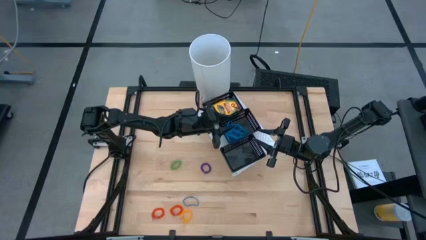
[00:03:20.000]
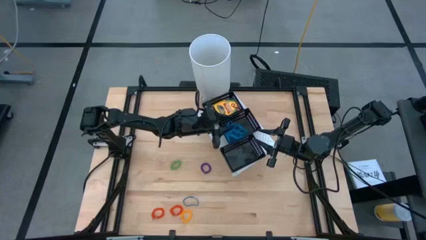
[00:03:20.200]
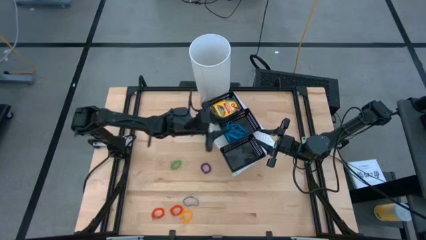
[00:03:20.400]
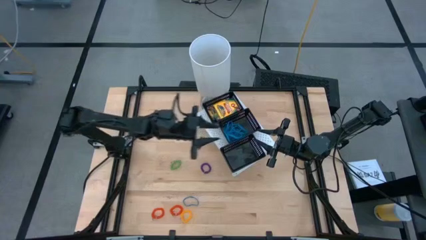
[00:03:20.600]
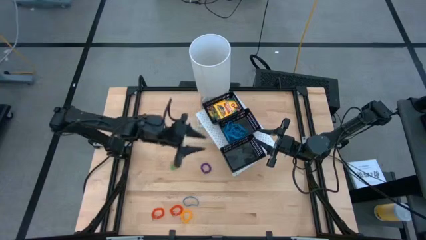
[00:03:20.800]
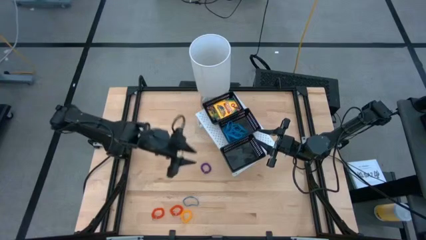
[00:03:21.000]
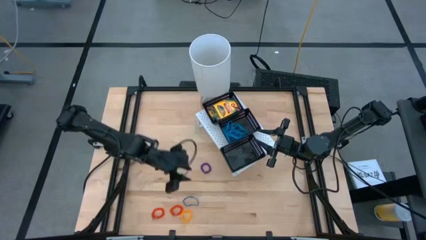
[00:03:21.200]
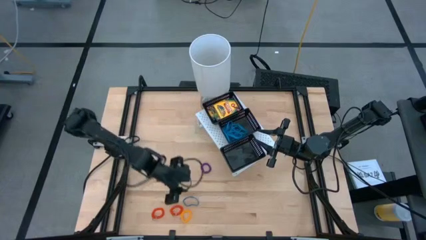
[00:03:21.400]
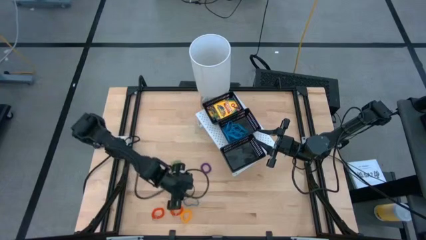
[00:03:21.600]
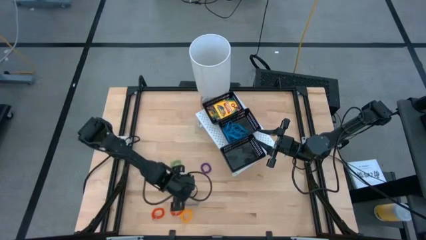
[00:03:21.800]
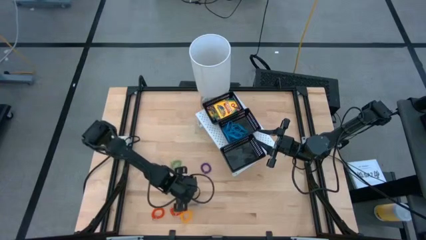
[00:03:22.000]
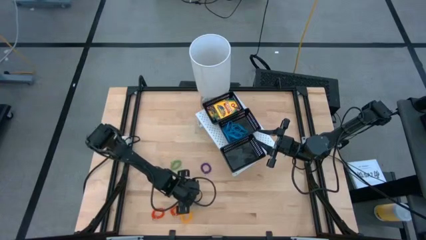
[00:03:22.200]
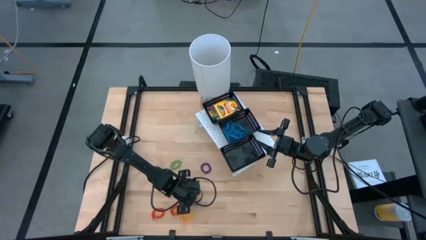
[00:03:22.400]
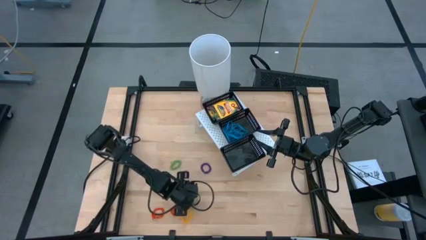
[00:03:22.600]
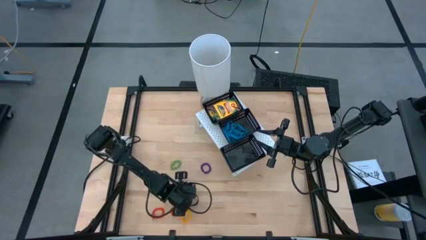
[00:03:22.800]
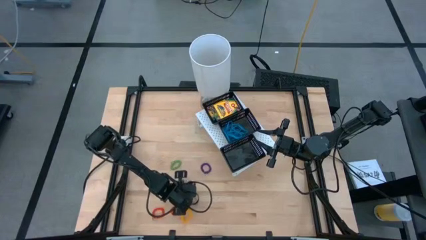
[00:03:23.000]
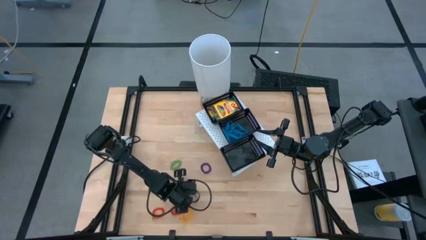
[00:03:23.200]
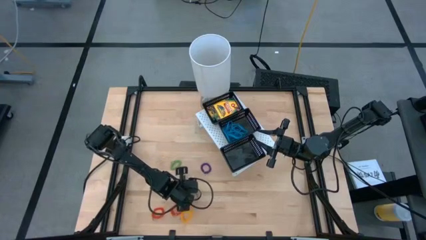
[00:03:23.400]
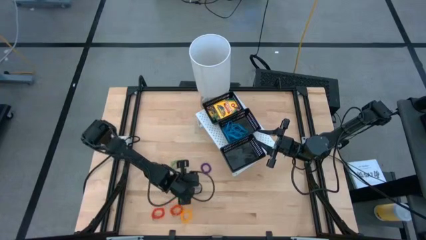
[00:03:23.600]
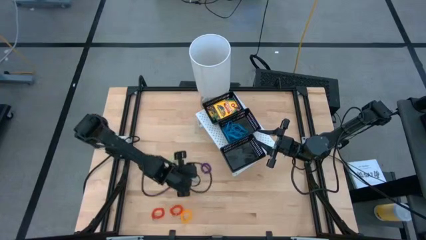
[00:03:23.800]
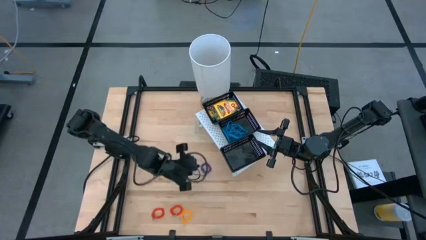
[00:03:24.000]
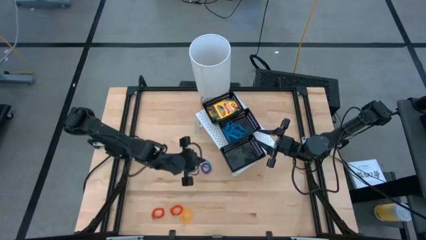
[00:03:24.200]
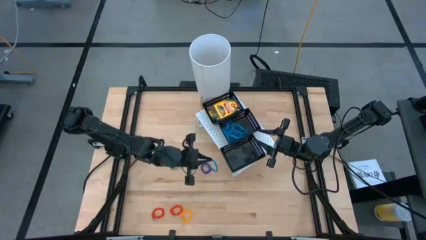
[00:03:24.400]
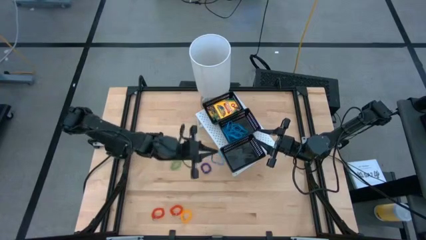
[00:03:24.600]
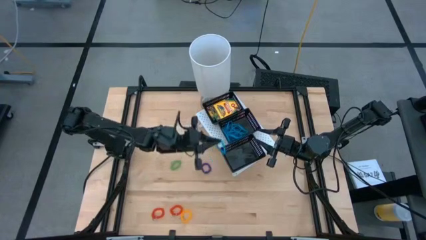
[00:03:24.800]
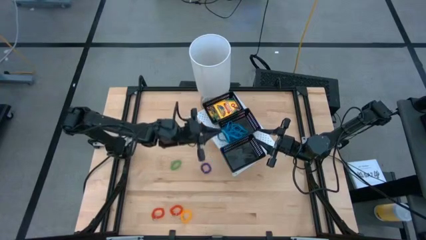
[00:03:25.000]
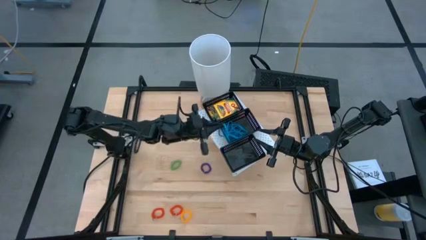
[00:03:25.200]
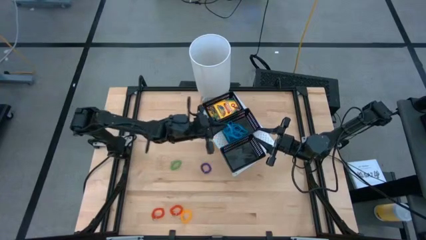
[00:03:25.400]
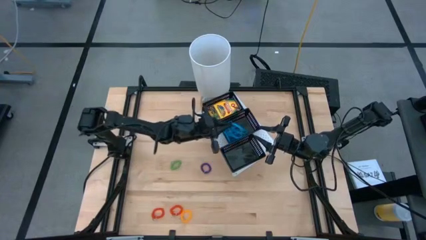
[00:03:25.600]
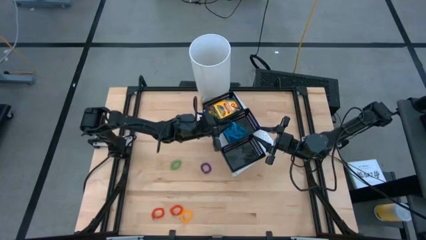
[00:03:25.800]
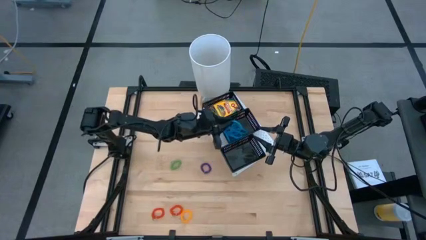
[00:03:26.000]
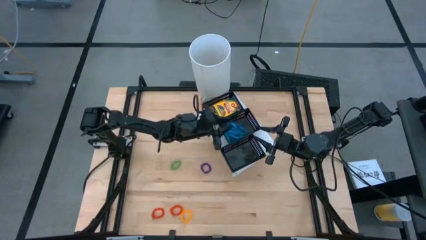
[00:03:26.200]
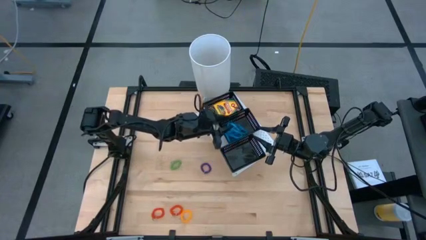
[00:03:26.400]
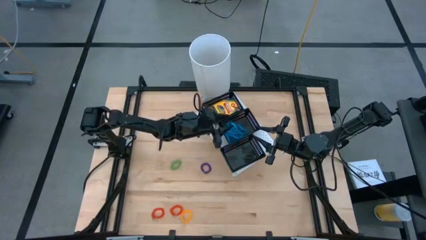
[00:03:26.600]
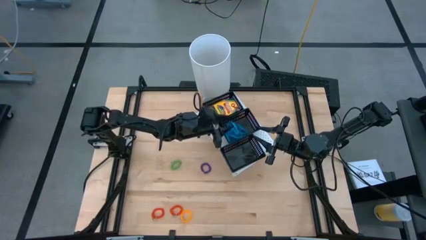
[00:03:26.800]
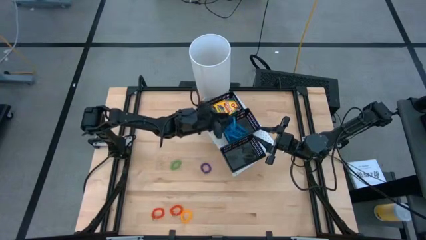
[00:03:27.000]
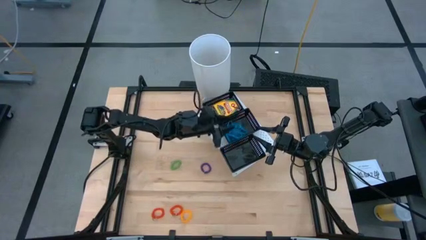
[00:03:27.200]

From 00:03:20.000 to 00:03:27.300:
Task: Pick & Place Office Desk Supplies
Put the blue rubber band into the middle black bin on the shelf

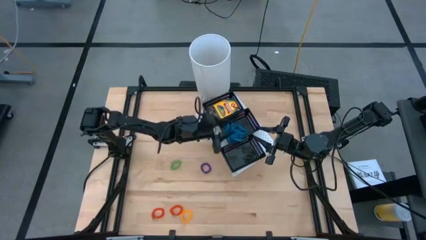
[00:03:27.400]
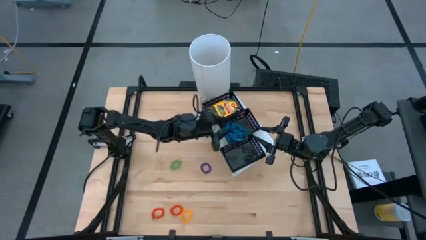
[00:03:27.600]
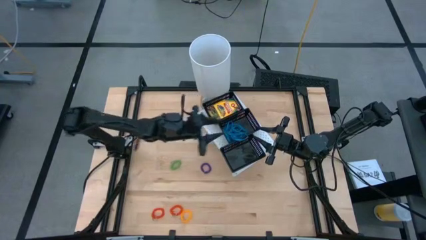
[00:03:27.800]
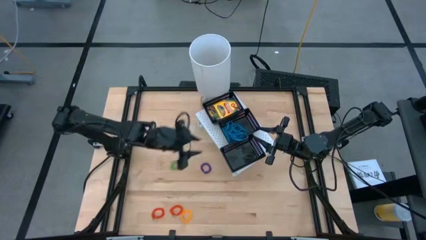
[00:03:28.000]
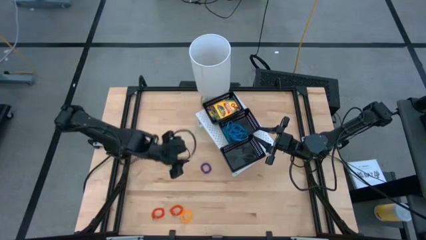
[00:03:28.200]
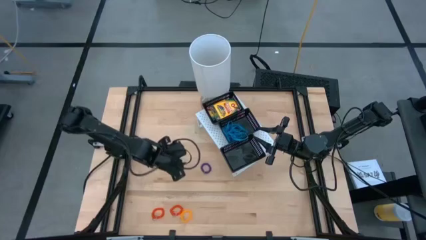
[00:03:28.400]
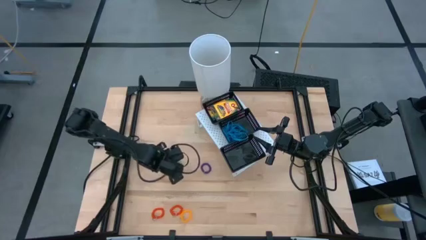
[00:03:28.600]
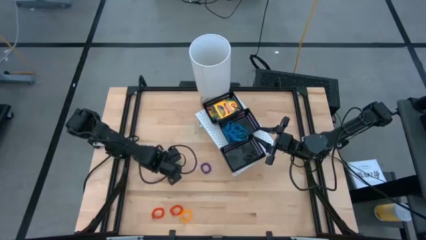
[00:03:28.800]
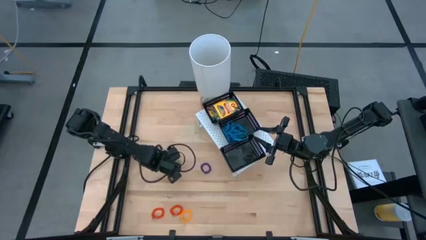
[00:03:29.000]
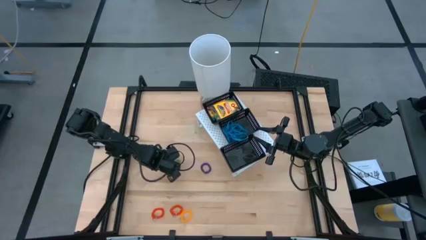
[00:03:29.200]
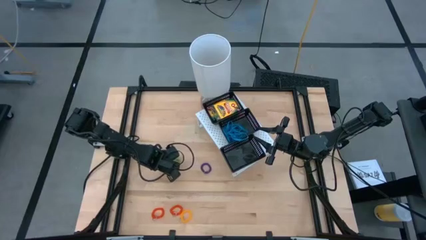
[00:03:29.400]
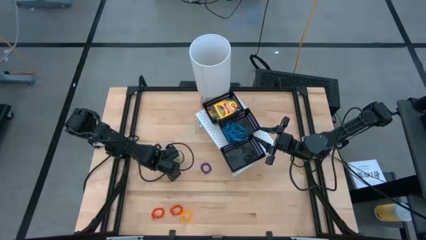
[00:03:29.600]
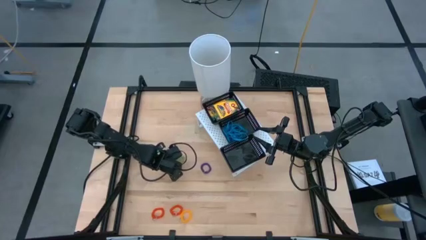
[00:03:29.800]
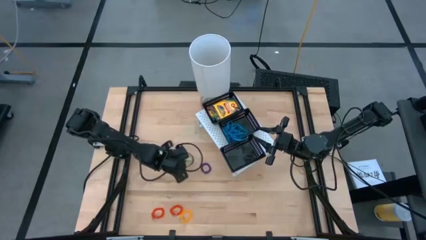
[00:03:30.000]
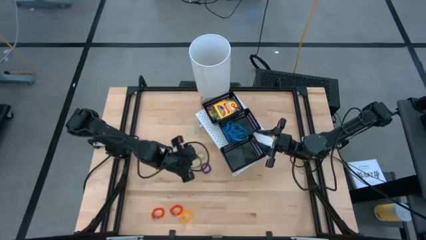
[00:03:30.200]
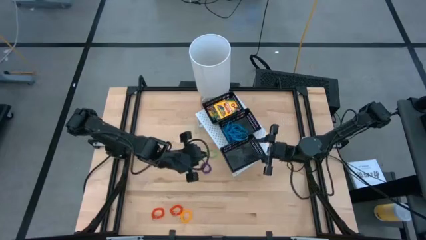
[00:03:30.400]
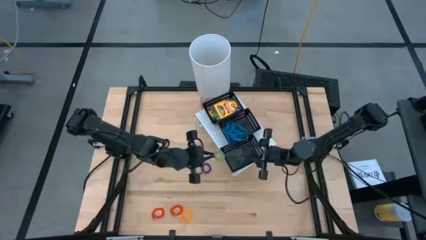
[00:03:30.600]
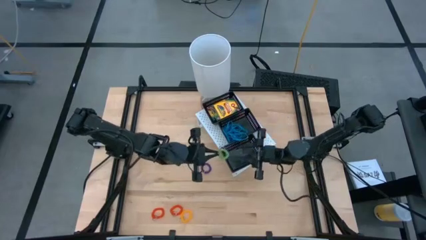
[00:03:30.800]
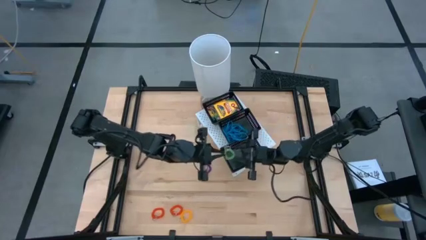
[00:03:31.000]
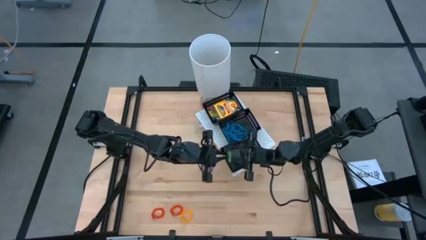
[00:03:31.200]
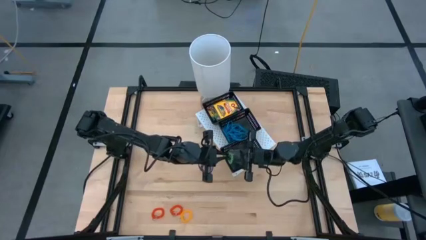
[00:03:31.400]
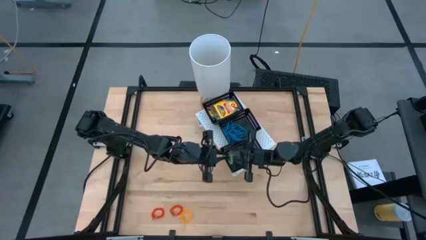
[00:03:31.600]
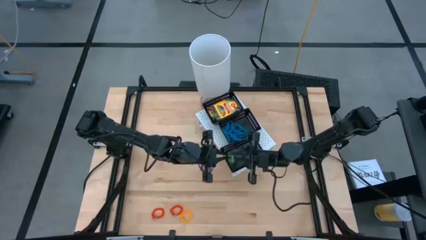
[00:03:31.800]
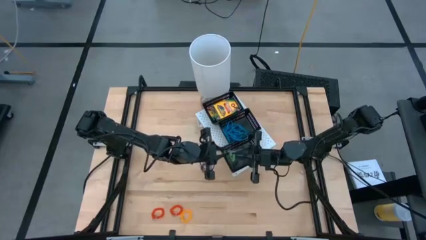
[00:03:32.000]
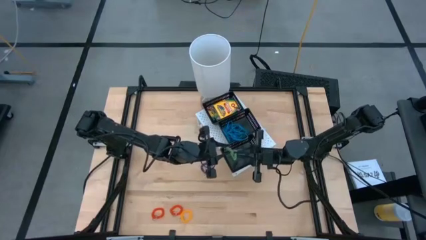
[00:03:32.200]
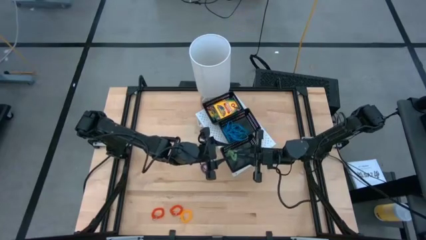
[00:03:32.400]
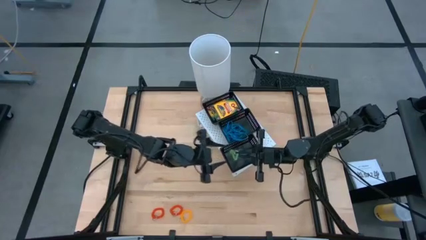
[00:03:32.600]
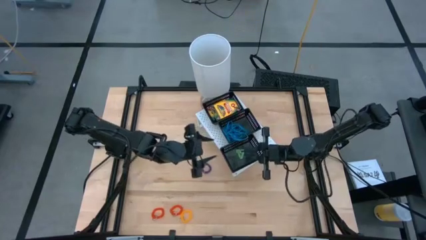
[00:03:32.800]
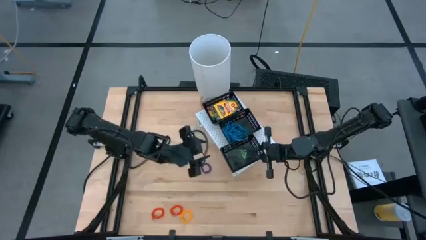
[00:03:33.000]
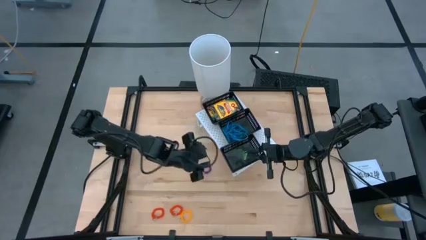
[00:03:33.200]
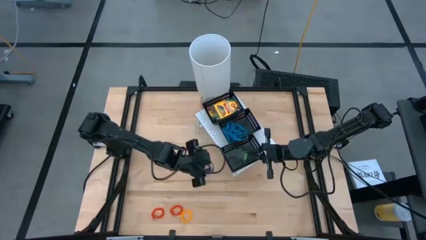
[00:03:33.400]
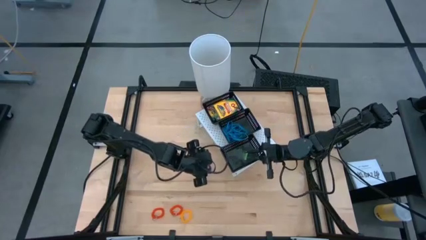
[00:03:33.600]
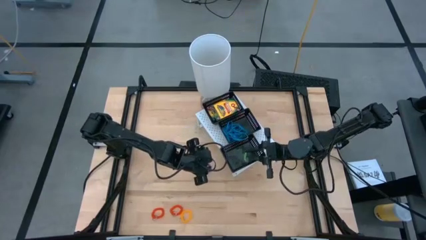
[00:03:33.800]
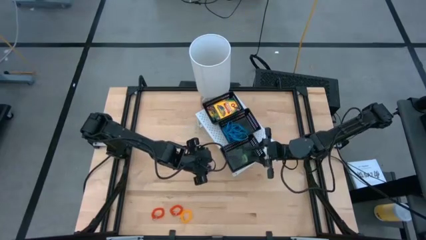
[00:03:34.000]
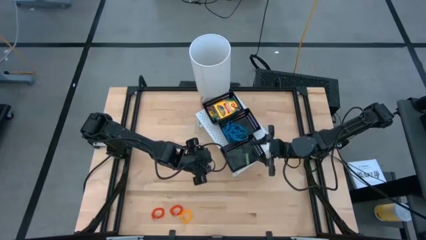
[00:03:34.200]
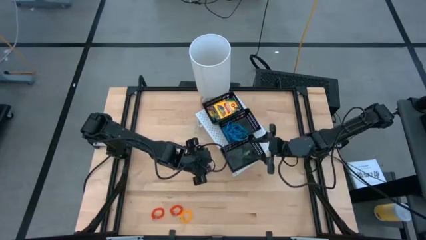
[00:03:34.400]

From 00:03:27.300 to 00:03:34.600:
Put the green spring rubberband into the bottom black bin on the shelf
